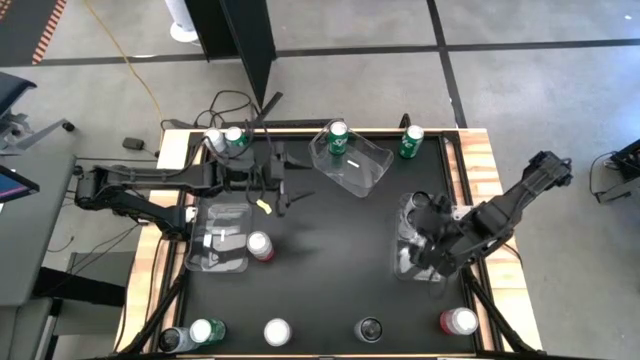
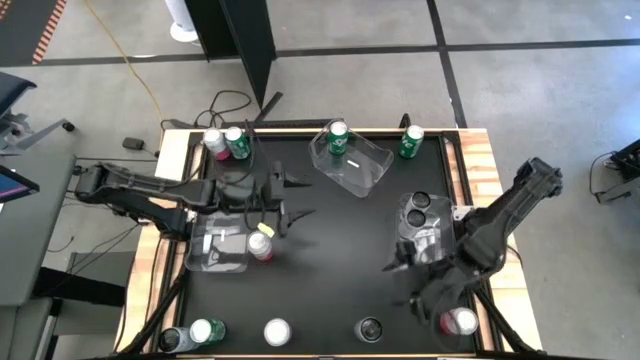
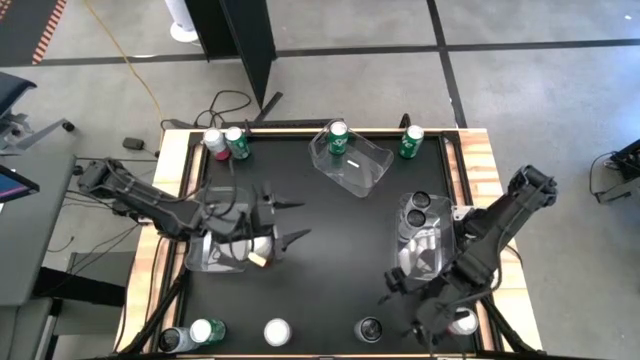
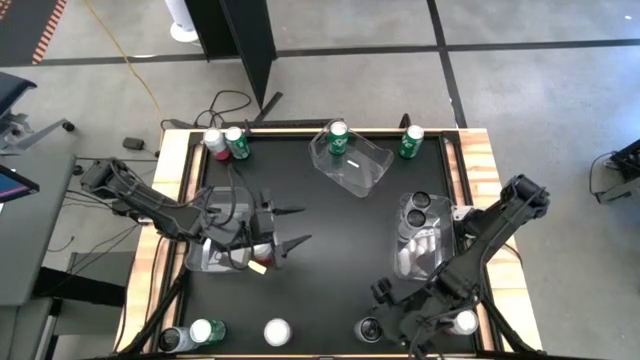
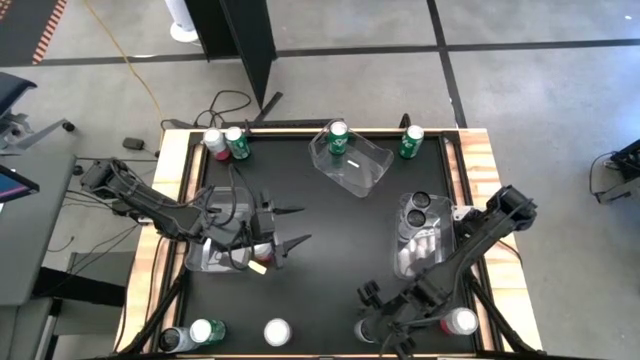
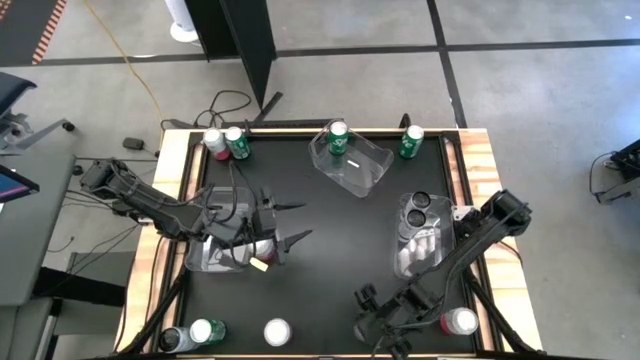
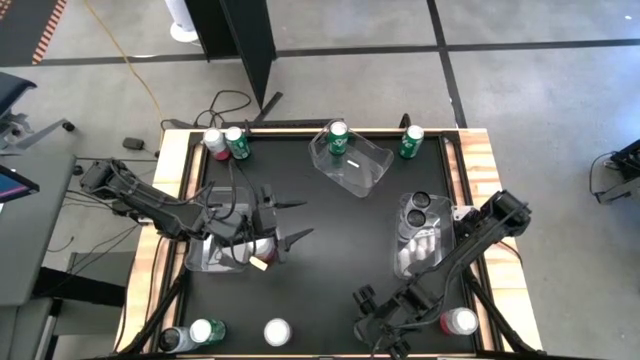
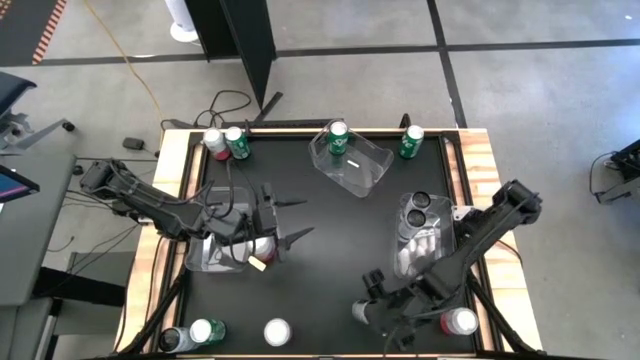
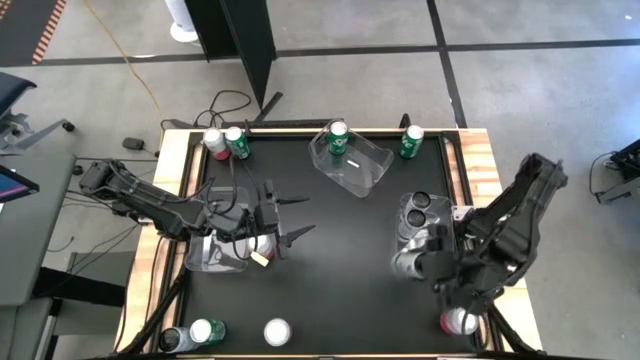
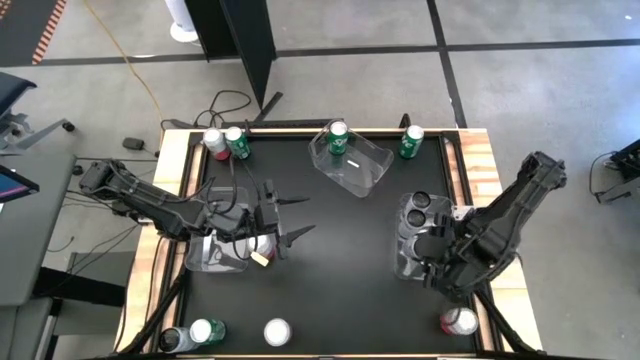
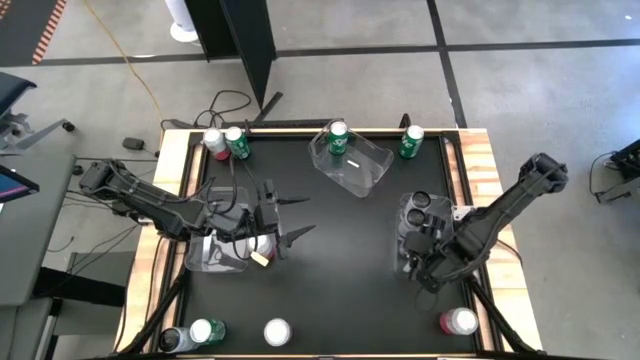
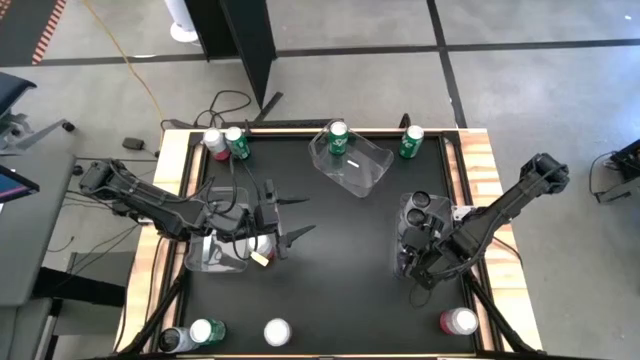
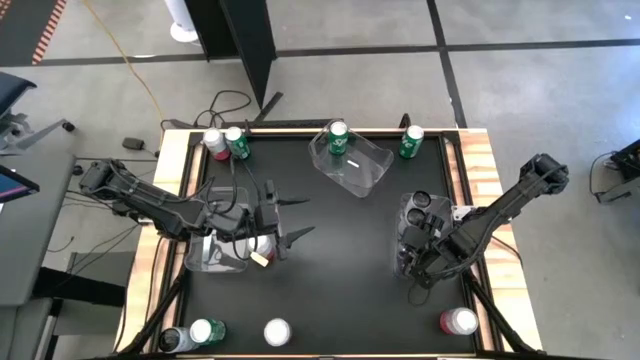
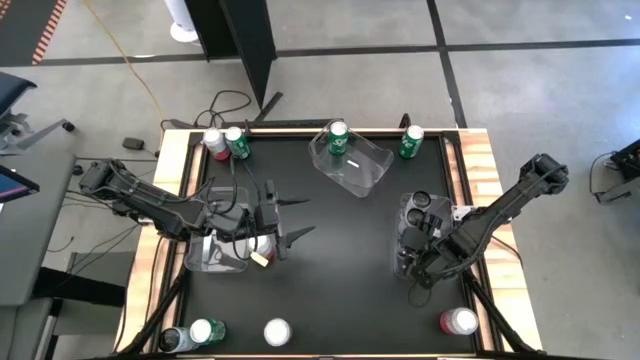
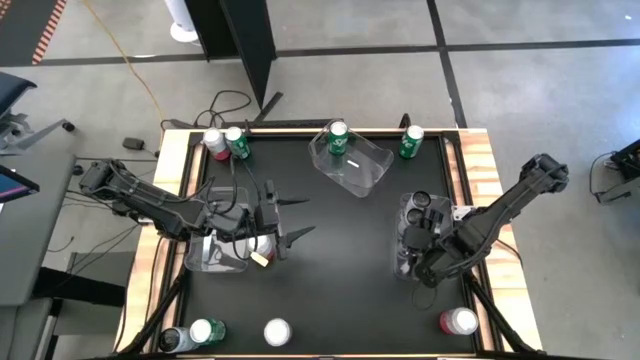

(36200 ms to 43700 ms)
Task: Sort soda cans
Put the right white blue soda can into the right transparent bin

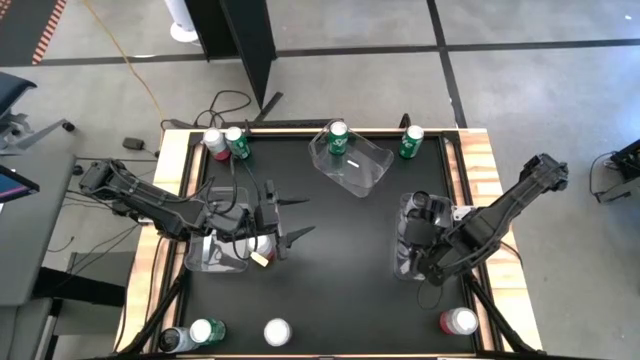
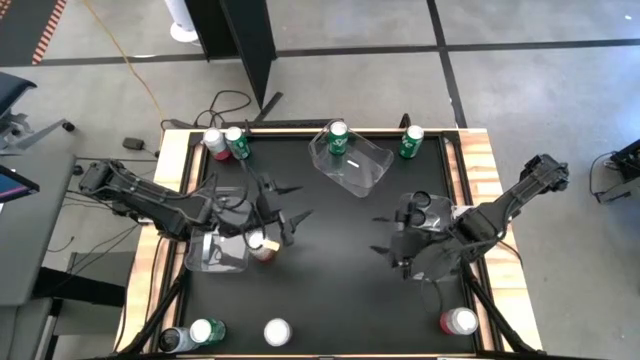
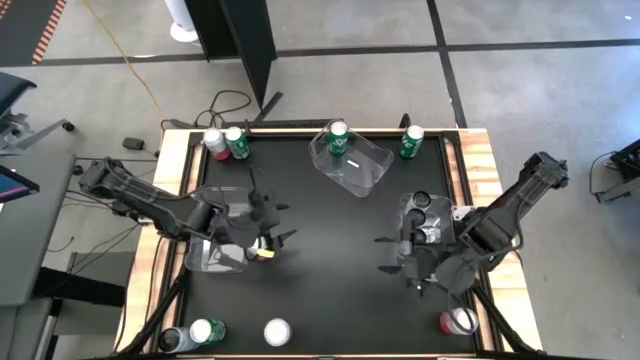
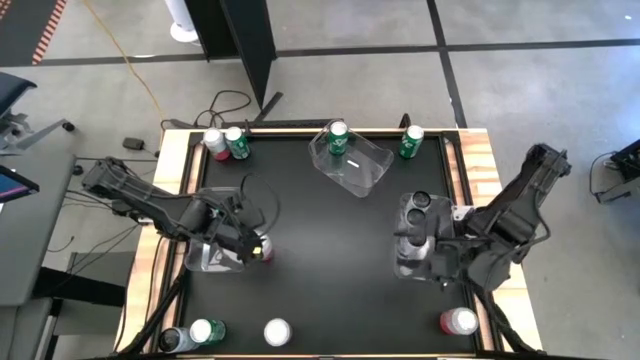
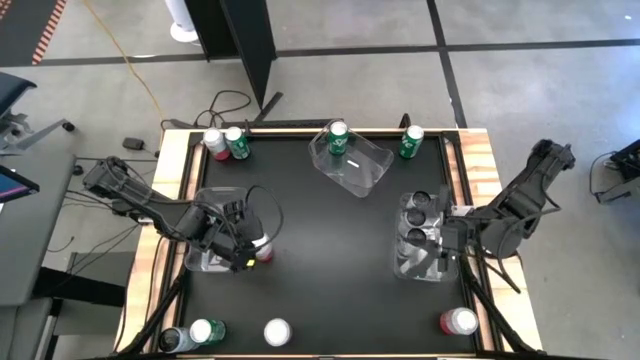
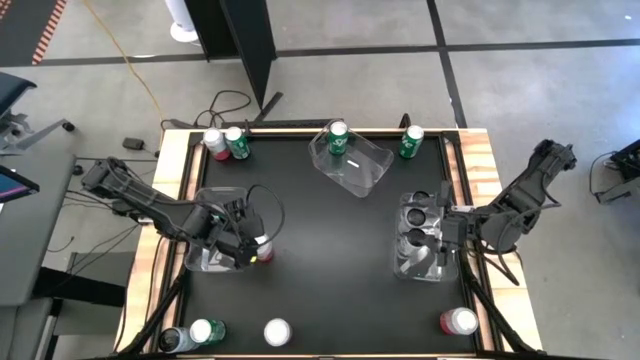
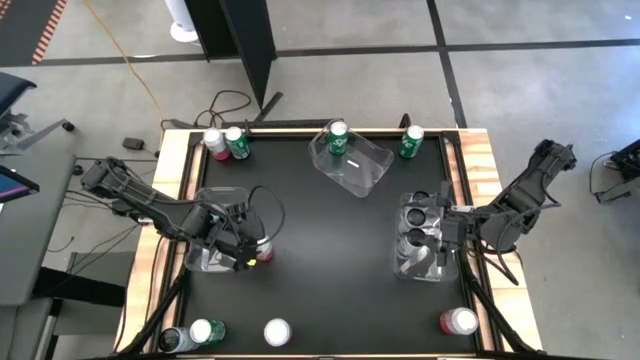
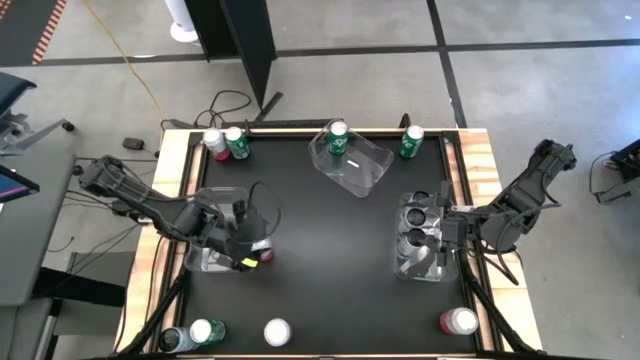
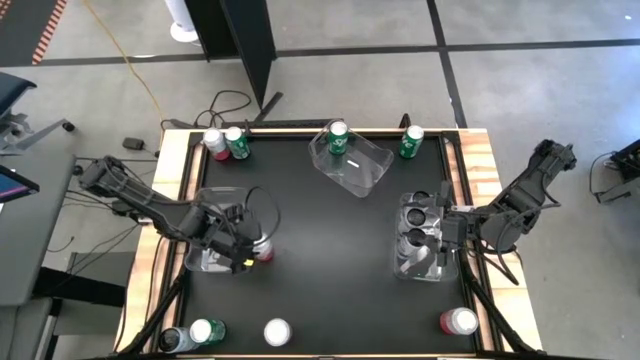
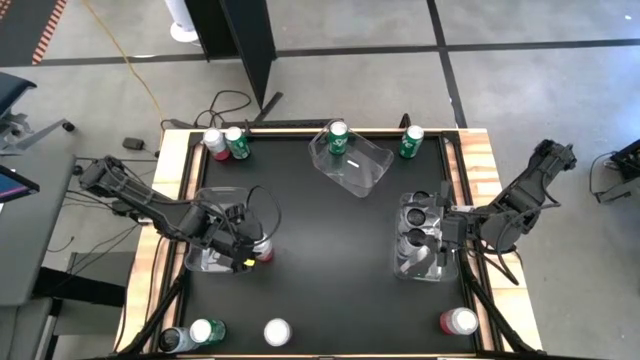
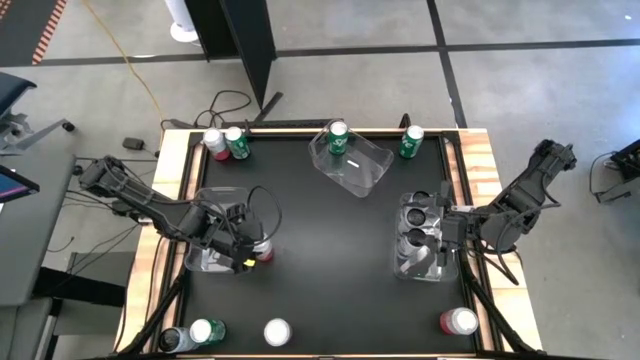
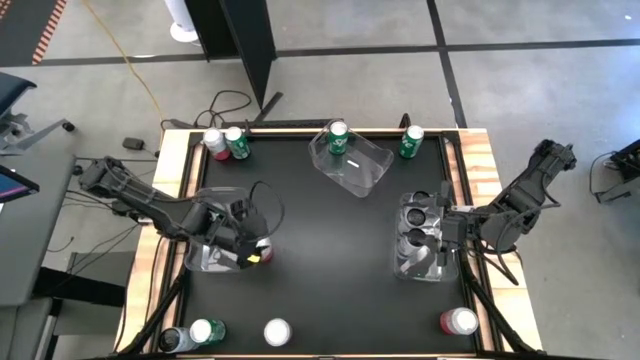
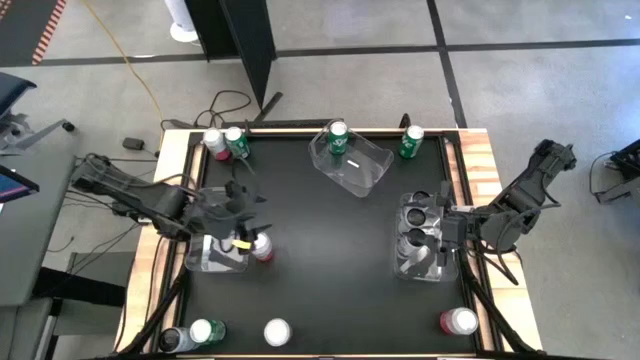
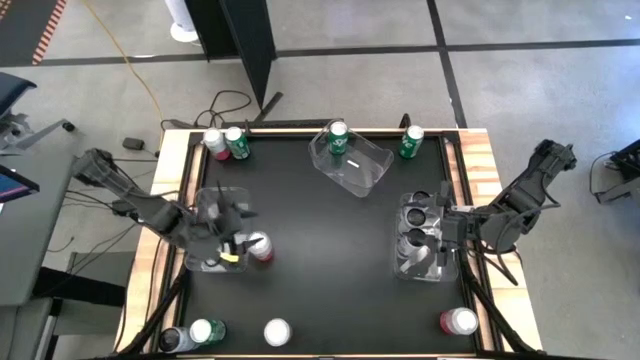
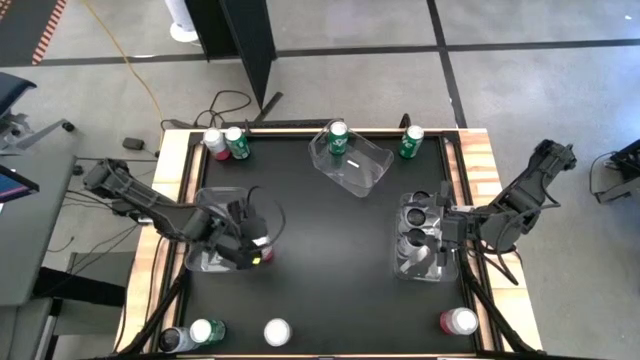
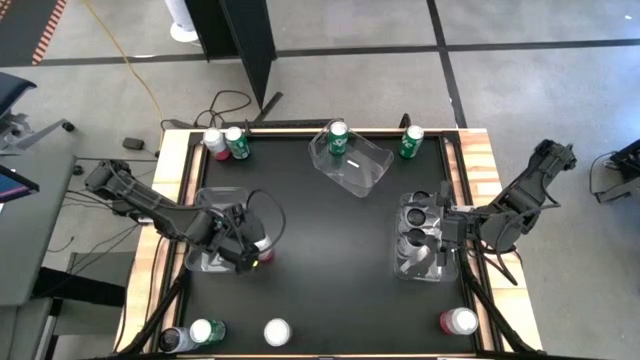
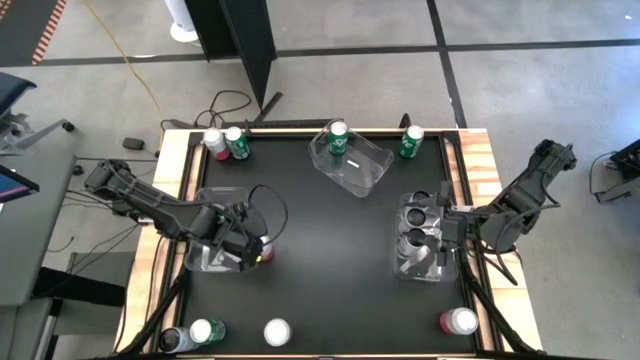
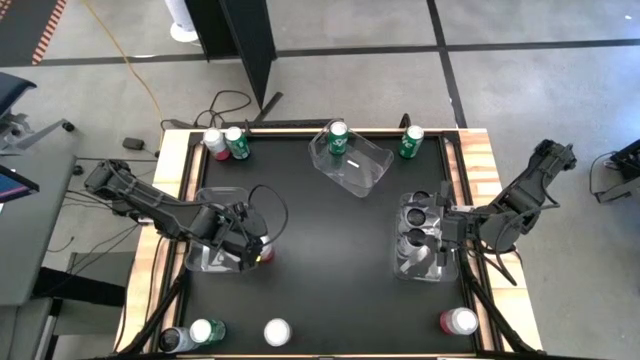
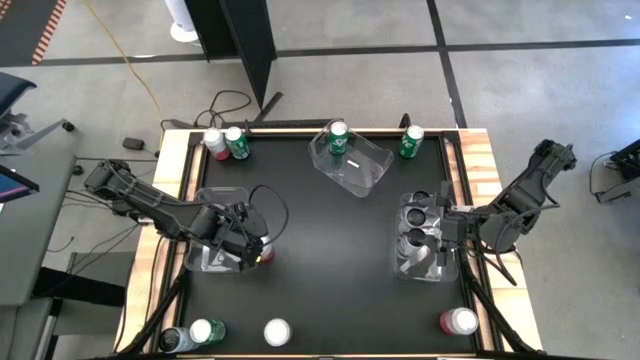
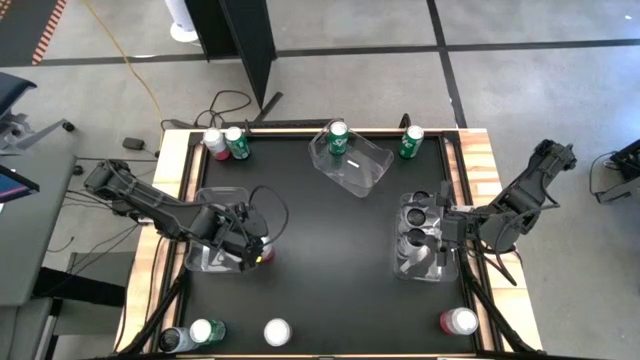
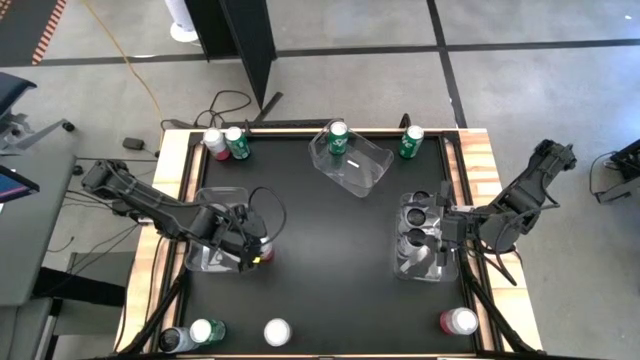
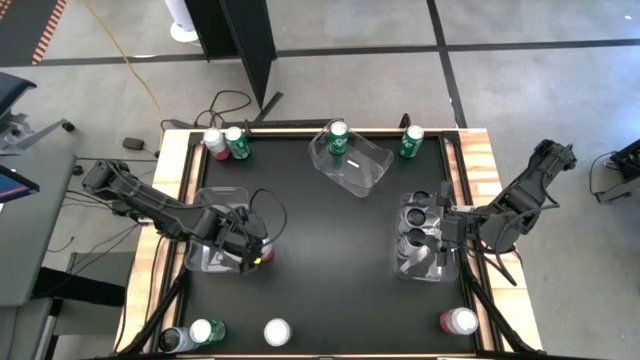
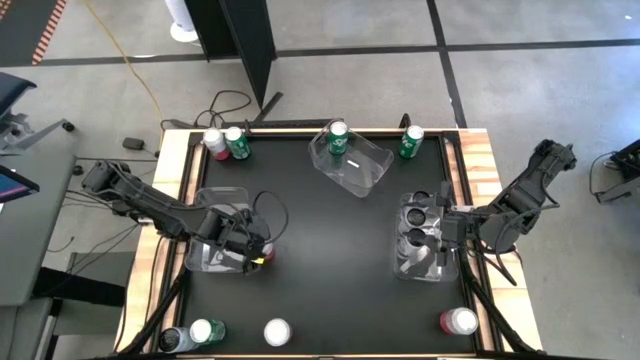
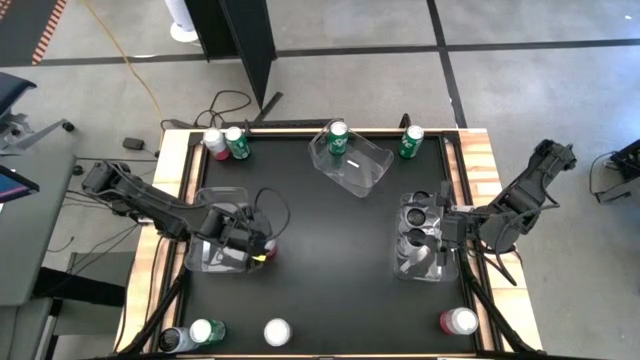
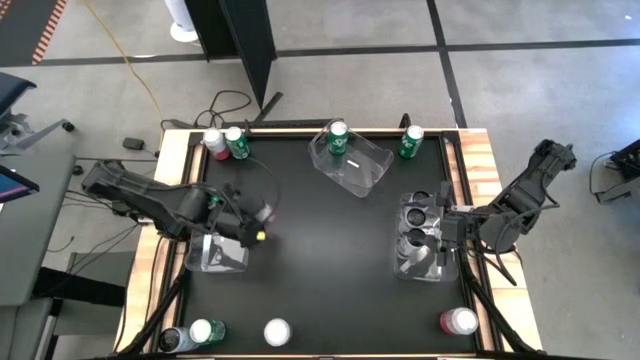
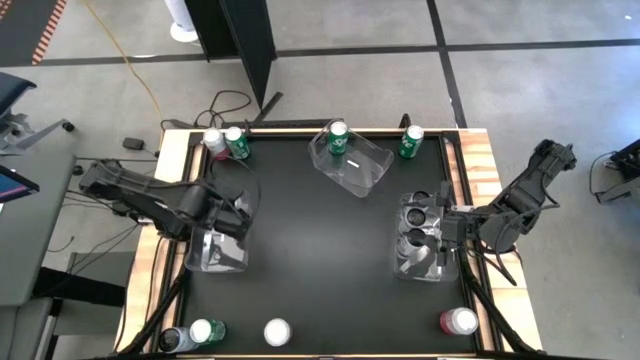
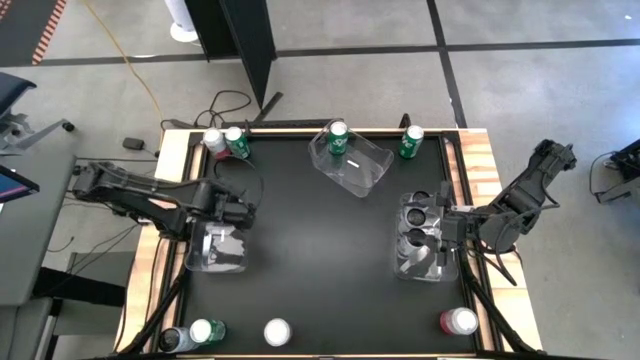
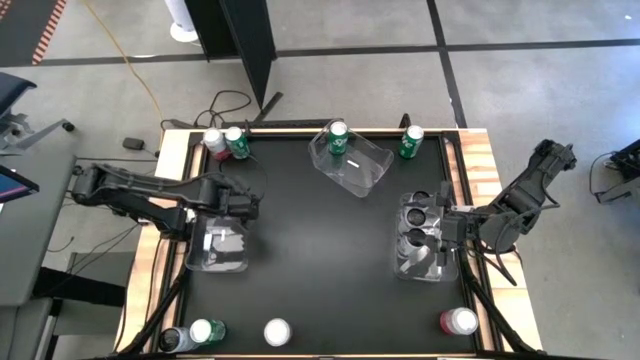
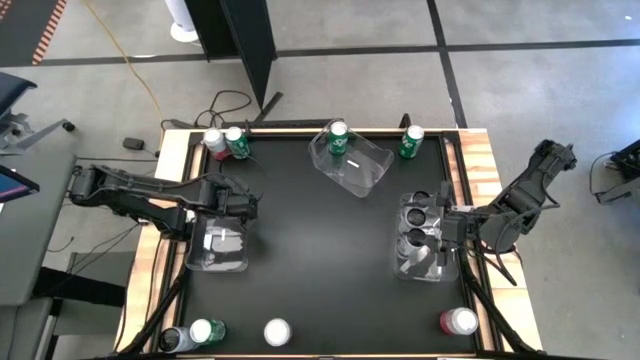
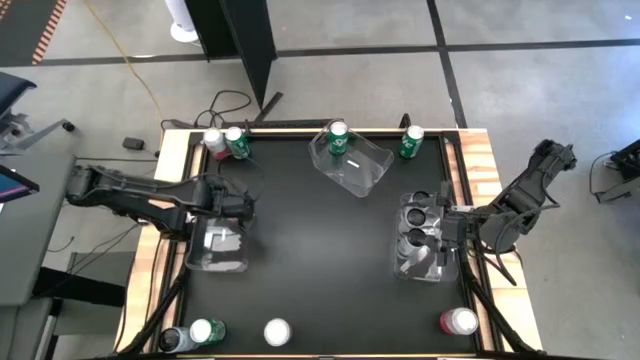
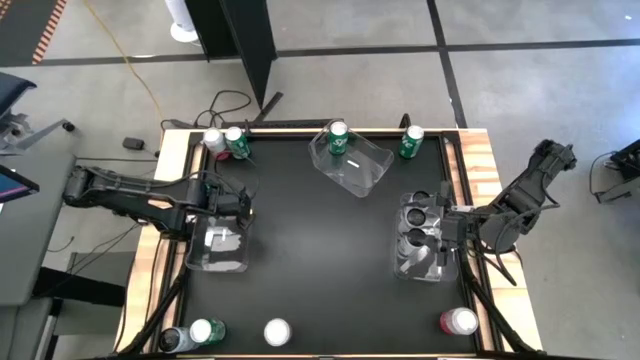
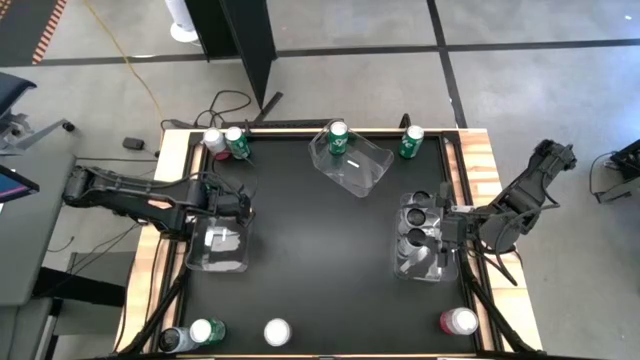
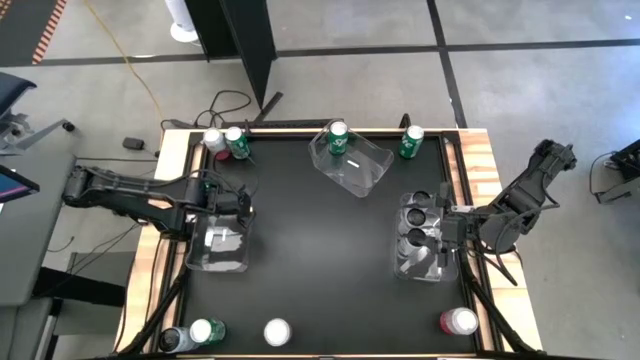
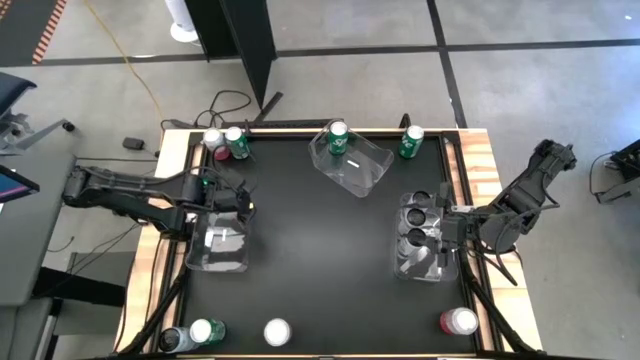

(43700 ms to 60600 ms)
Put the middle left pink white soda can into the left transparent bin
